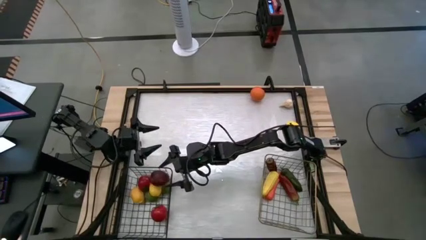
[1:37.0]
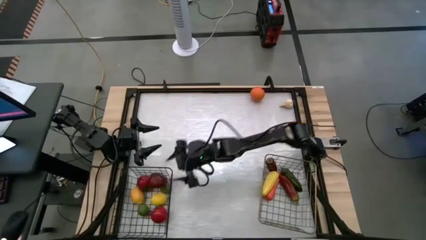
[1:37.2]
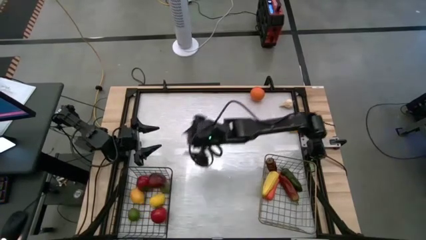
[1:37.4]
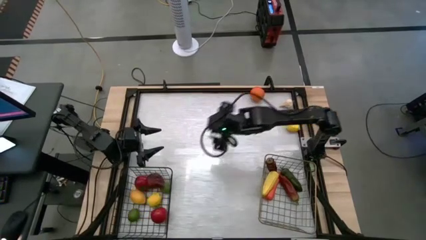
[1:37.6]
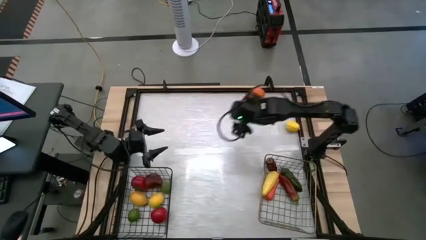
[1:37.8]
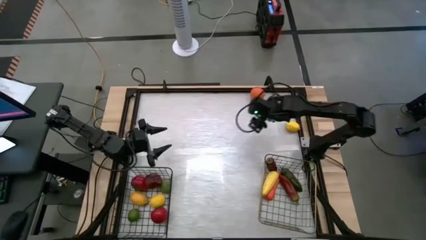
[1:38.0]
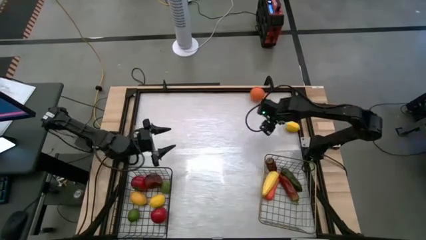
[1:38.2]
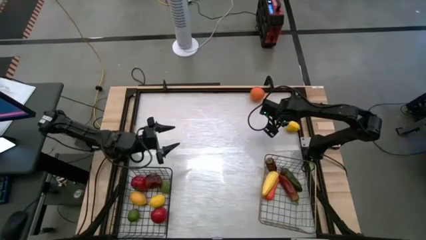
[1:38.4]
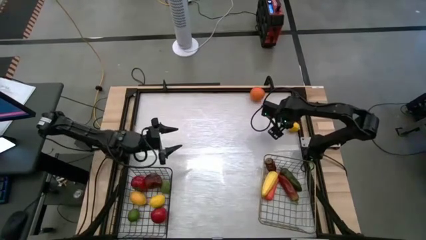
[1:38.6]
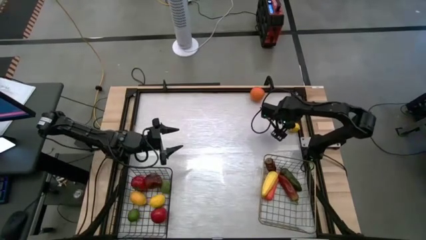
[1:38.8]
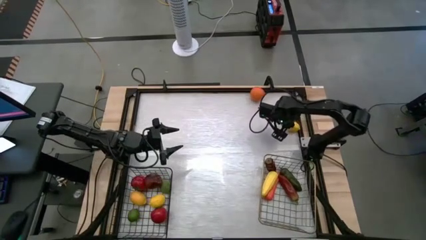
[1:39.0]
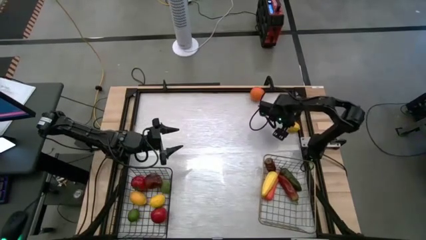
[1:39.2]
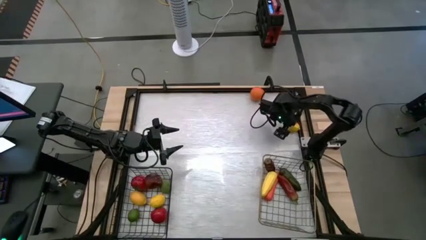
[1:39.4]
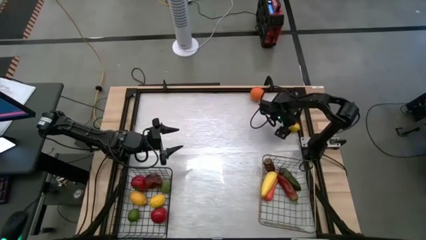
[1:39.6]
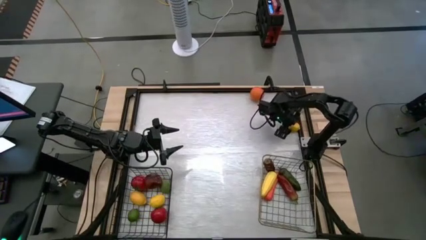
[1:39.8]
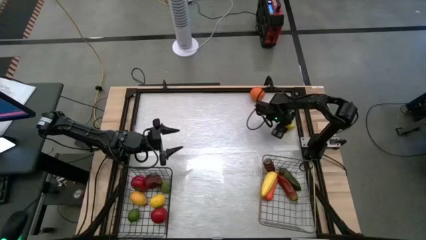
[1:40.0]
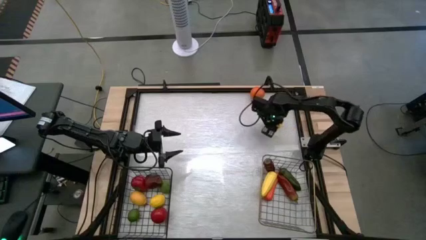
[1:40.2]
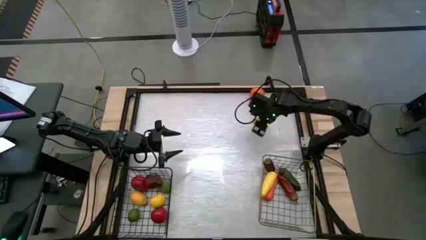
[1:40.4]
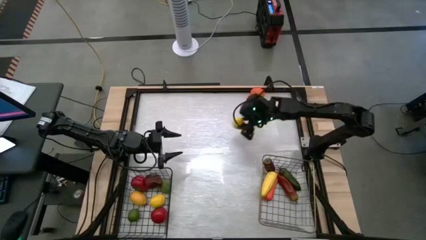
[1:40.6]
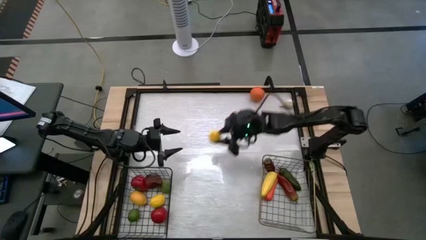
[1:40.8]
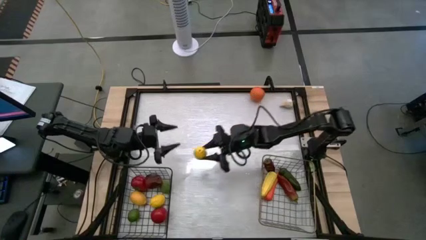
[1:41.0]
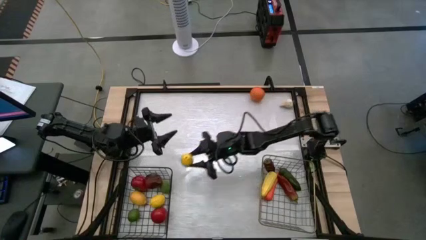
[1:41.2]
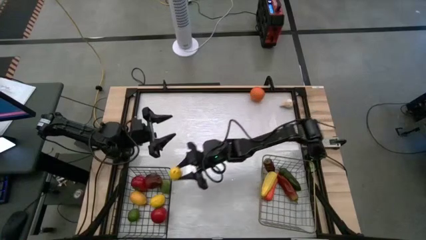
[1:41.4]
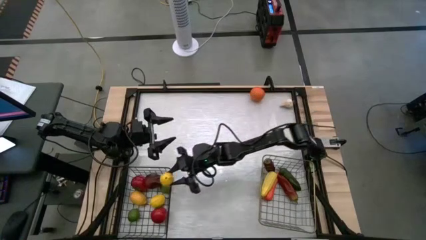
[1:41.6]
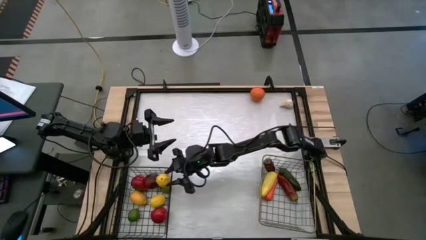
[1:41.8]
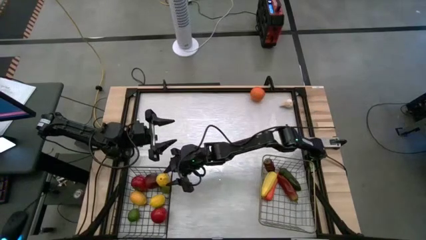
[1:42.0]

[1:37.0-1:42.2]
Task: Sort produce into baskets
Put the yellow lemon into the black wire basket

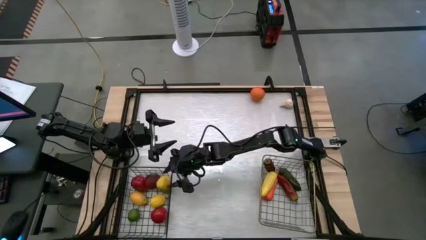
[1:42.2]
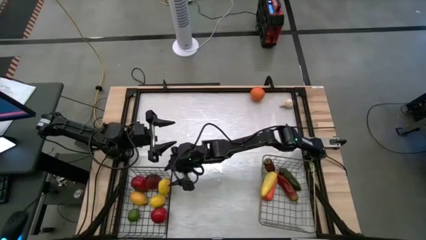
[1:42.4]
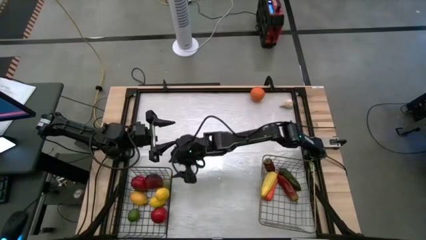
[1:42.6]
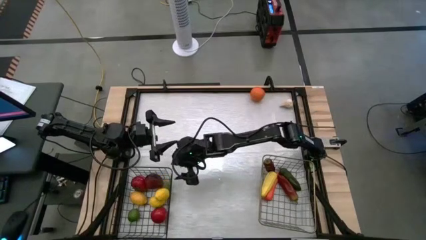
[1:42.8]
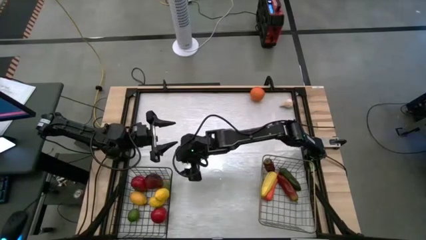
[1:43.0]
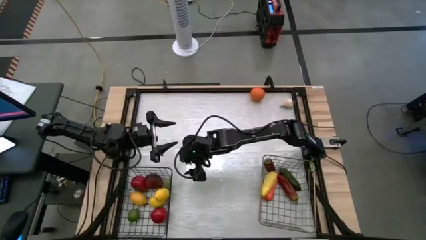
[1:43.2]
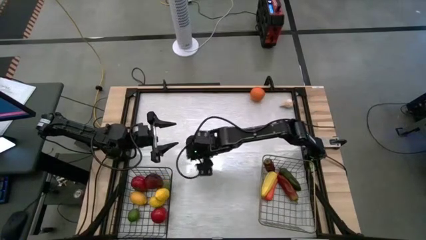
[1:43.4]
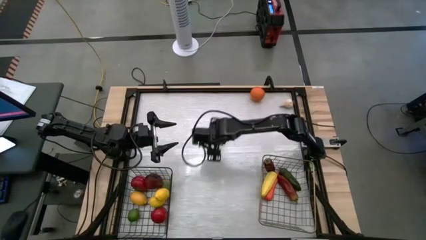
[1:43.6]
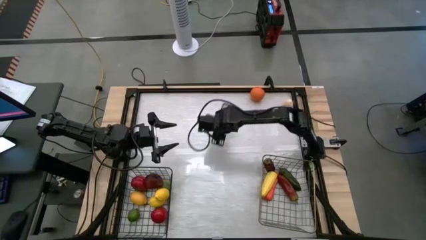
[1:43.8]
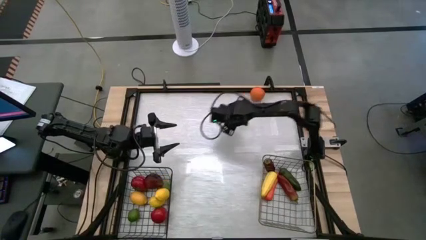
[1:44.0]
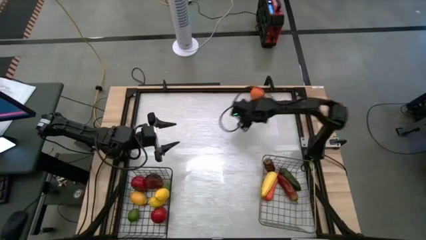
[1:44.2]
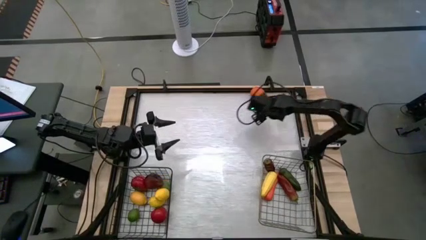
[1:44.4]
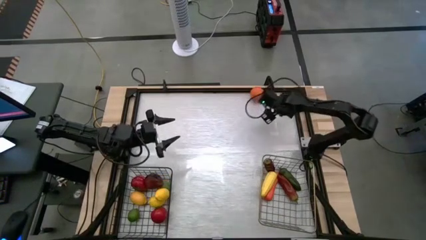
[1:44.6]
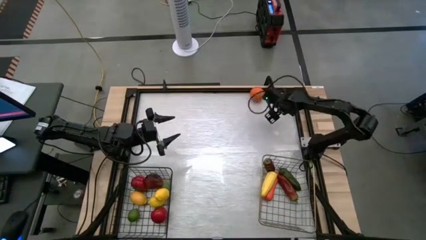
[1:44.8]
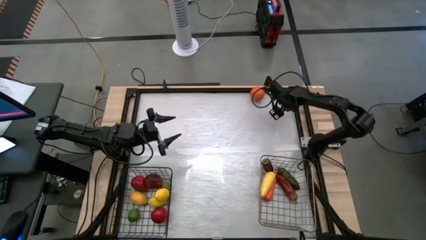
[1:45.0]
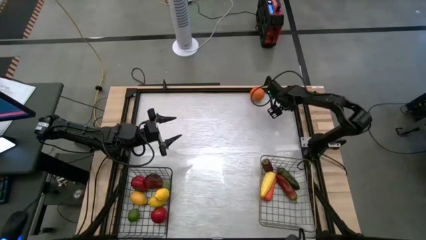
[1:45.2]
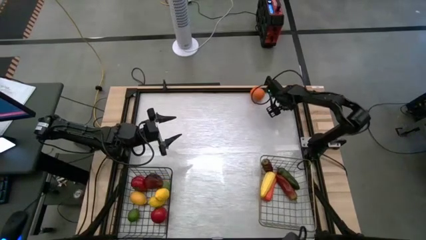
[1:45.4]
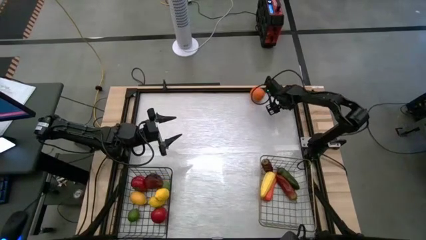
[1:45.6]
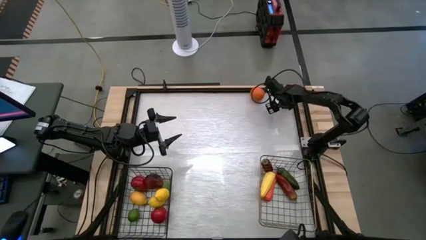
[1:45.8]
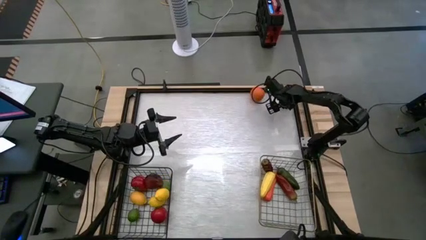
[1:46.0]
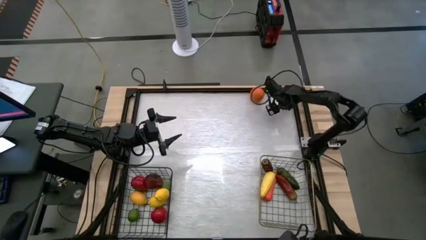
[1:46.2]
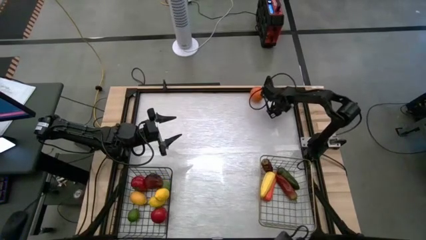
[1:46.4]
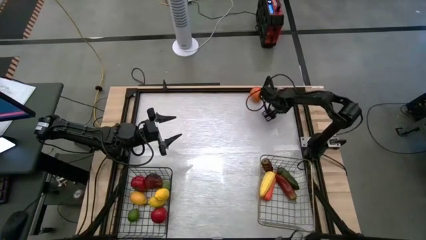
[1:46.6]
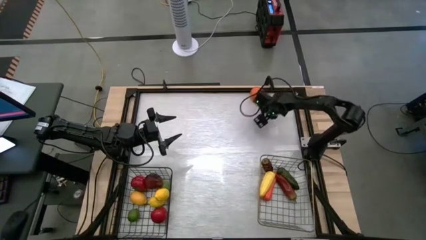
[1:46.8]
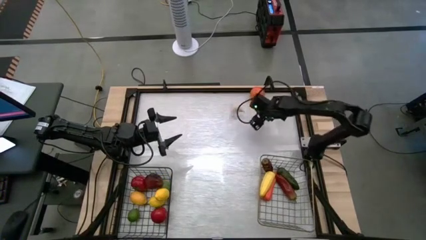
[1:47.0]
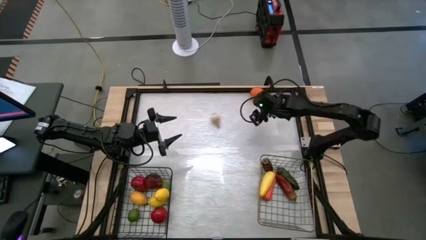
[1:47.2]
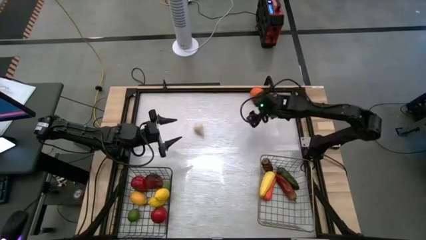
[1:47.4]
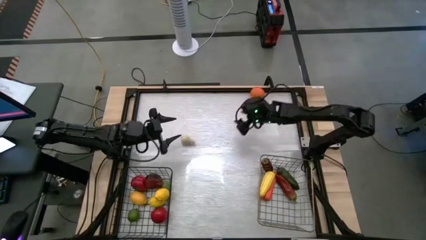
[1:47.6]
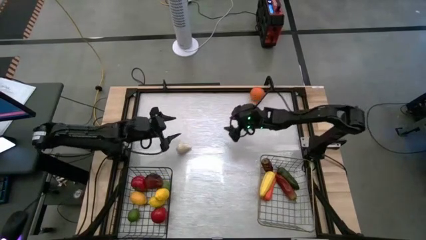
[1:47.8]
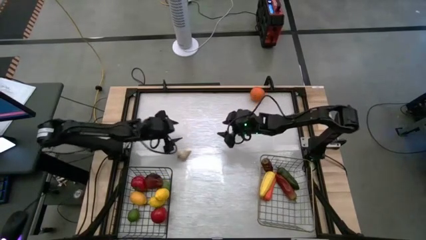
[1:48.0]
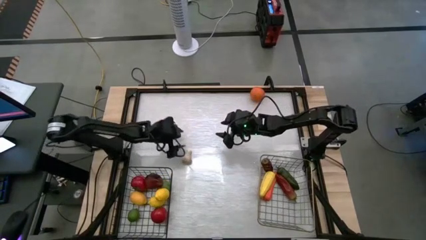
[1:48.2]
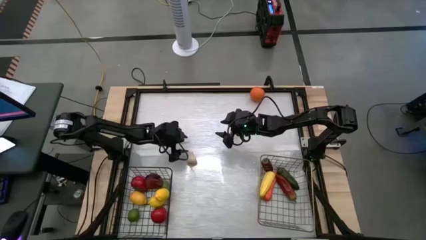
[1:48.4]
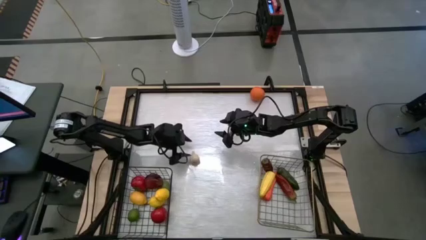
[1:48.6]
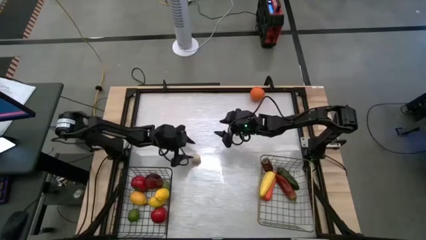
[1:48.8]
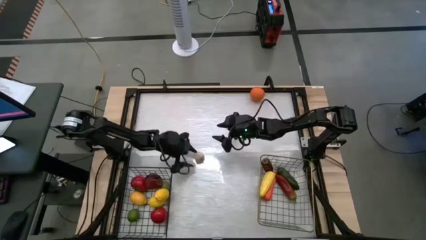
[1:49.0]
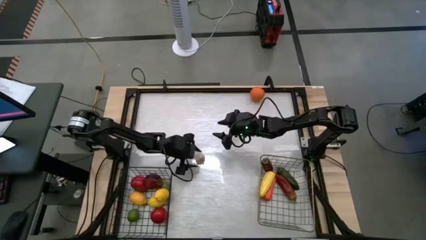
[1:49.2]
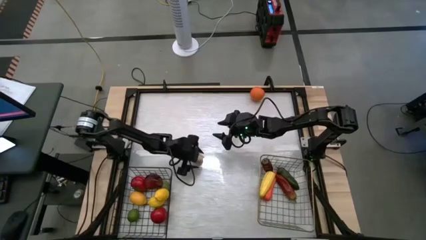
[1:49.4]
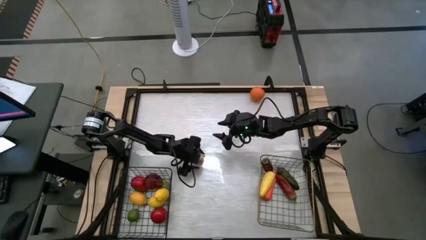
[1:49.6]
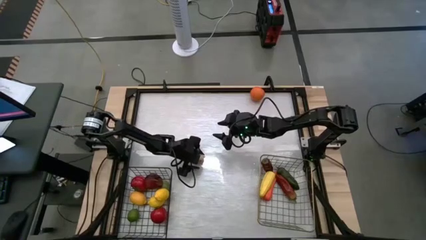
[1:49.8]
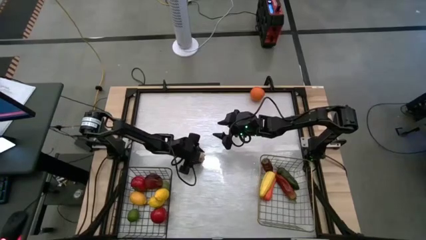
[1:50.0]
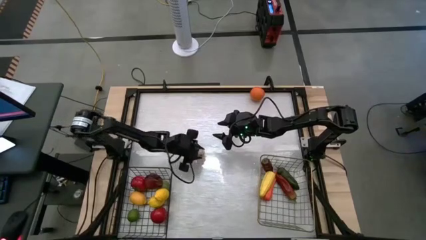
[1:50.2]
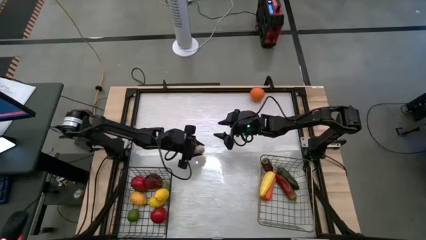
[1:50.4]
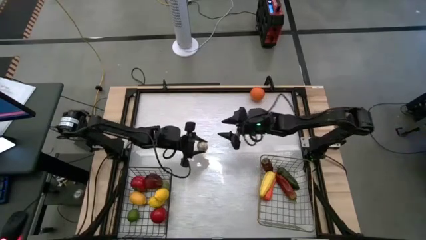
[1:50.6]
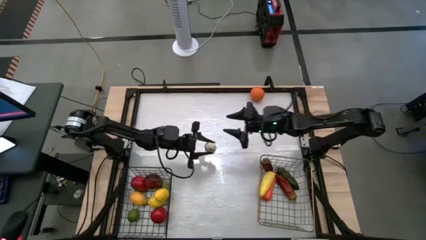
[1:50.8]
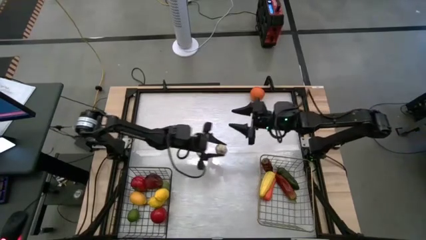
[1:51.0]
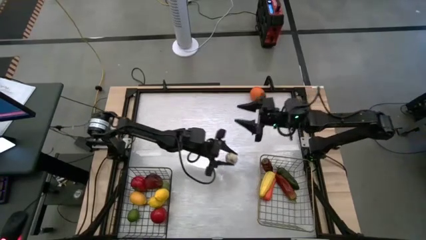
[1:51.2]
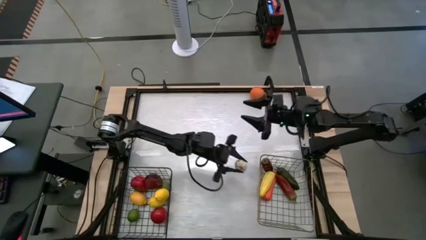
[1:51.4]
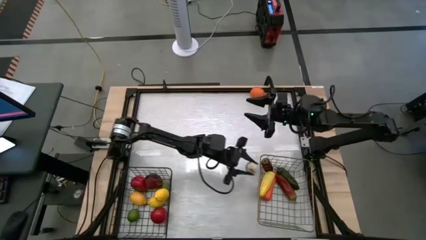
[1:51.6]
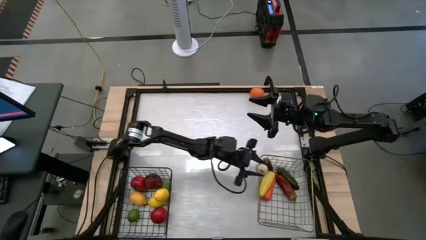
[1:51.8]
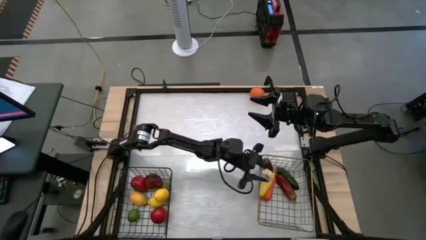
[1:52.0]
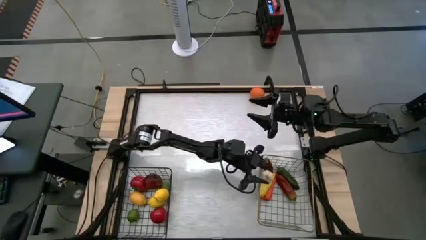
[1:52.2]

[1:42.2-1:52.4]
Put the white garlic into the gold wire basket

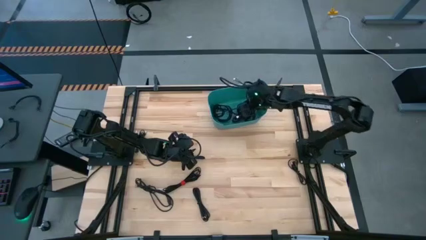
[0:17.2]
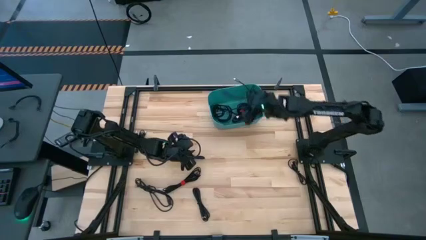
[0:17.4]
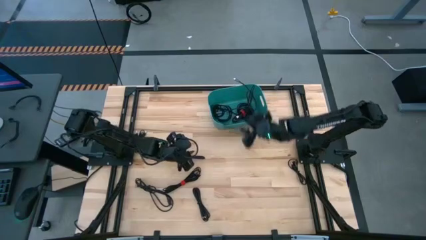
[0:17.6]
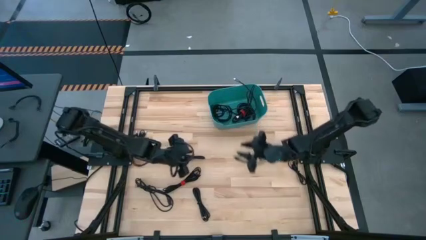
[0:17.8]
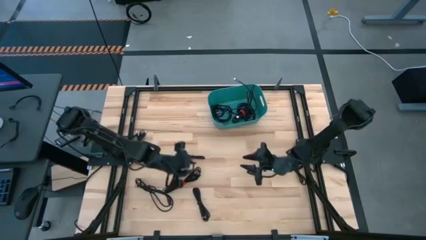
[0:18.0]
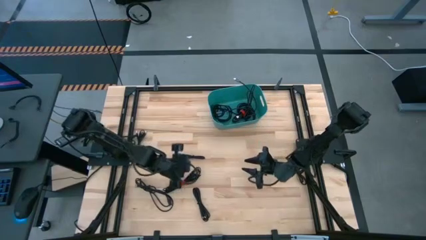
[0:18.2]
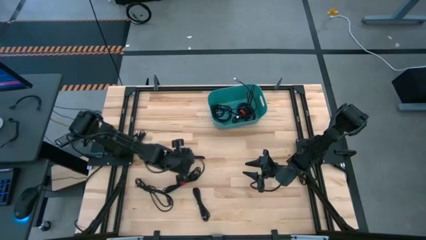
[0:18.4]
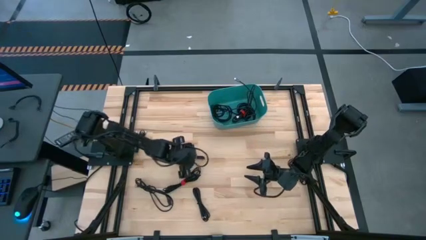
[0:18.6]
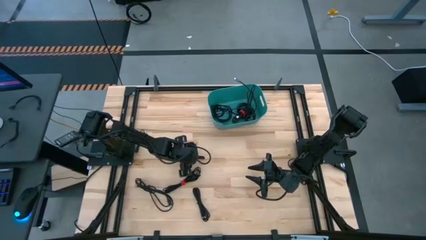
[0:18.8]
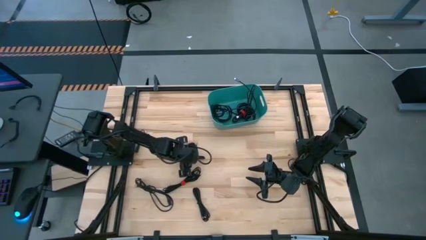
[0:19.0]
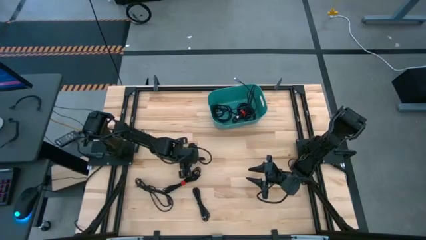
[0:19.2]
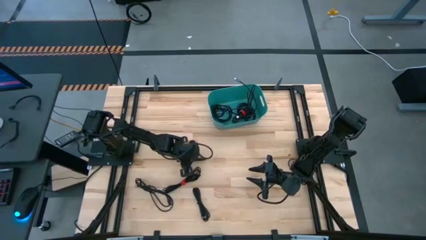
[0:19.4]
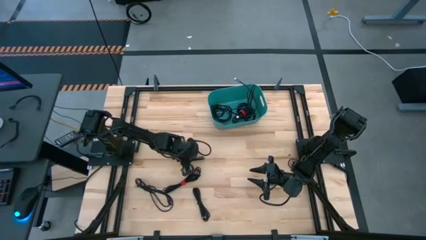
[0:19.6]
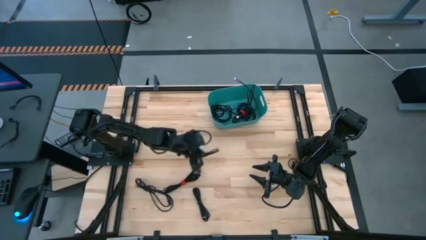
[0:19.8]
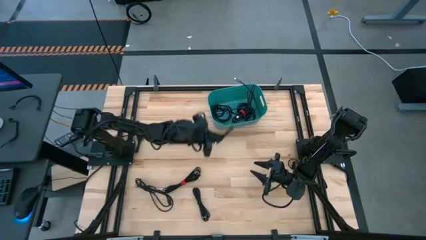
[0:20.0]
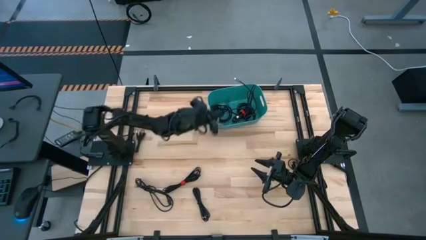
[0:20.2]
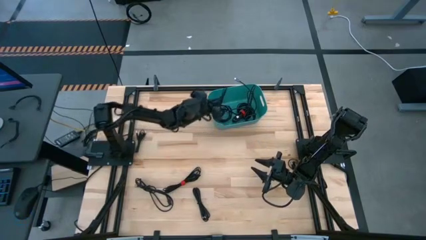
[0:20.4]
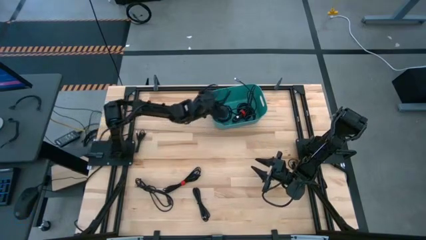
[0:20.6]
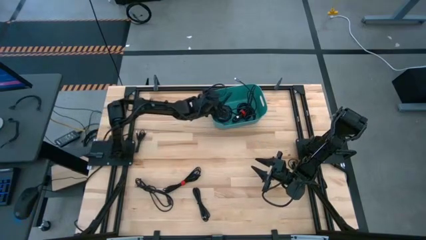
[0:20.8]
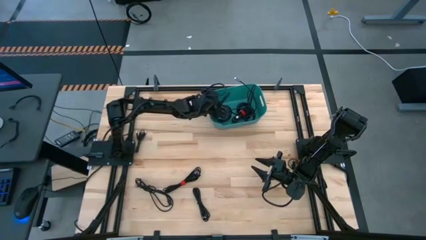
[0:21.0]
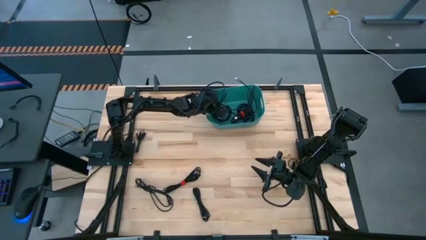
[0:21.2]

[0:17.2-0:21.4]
Task: Pick and place USB-C Cables
Put the black charger cable into the blue bin
